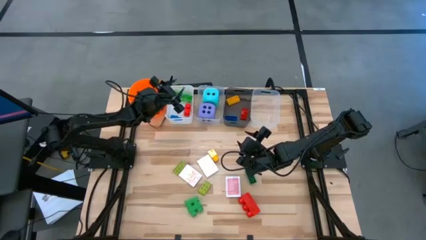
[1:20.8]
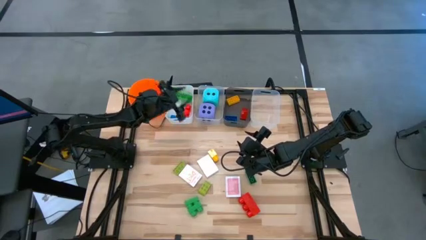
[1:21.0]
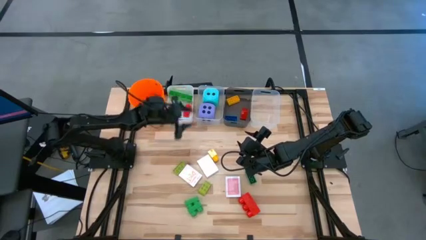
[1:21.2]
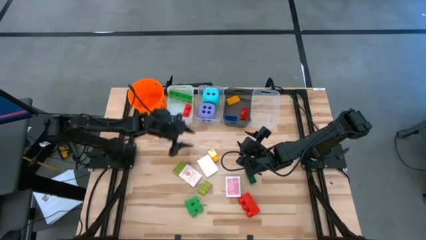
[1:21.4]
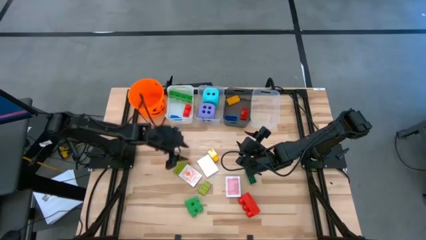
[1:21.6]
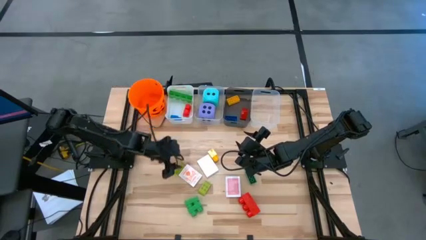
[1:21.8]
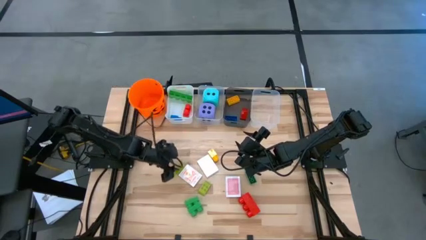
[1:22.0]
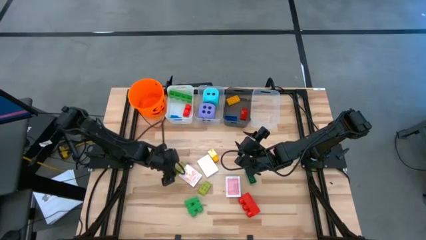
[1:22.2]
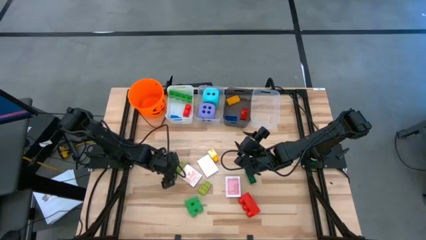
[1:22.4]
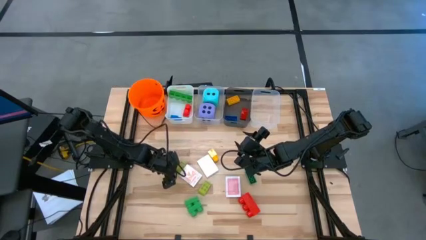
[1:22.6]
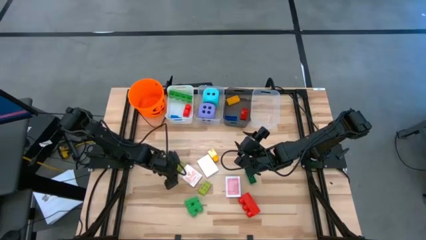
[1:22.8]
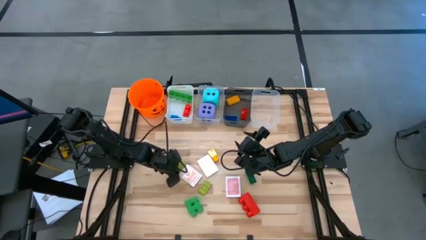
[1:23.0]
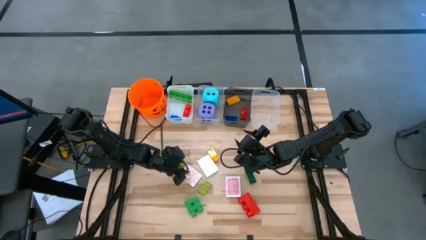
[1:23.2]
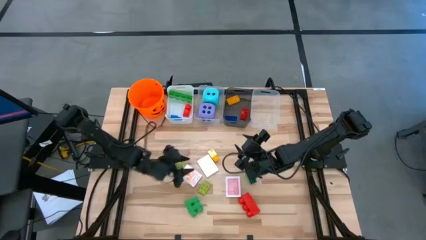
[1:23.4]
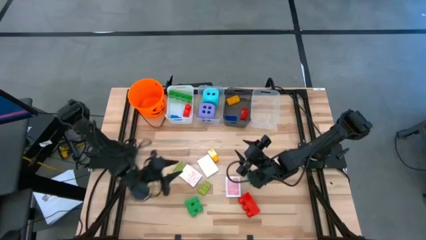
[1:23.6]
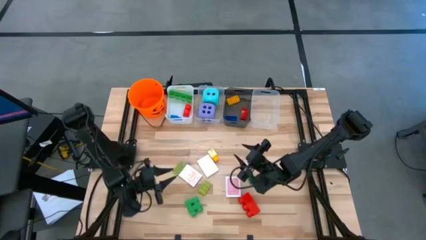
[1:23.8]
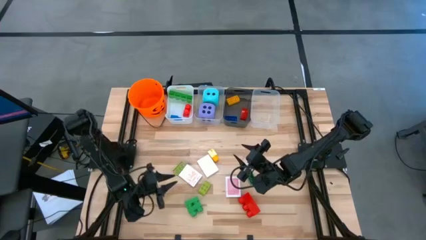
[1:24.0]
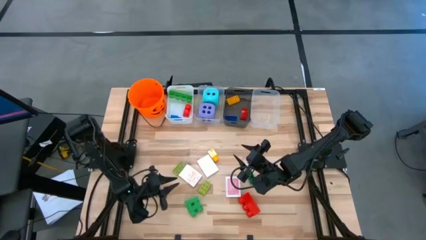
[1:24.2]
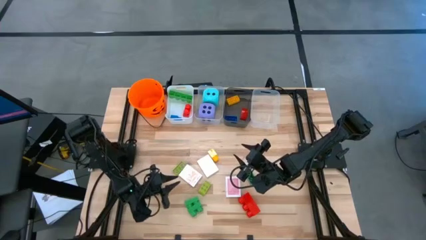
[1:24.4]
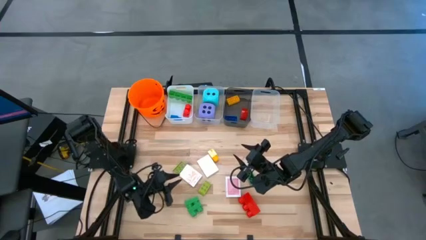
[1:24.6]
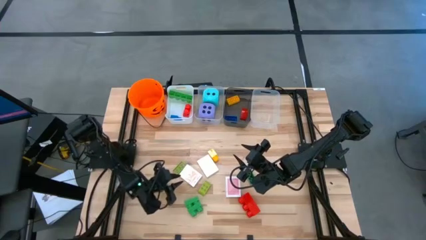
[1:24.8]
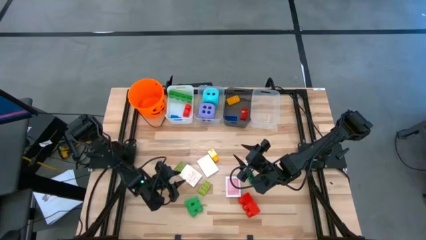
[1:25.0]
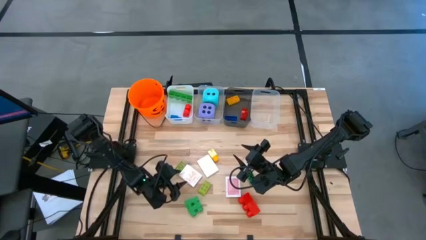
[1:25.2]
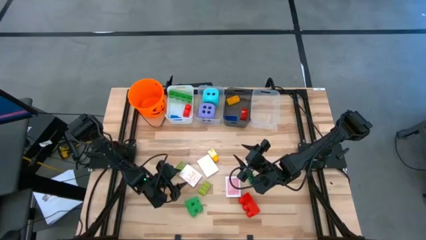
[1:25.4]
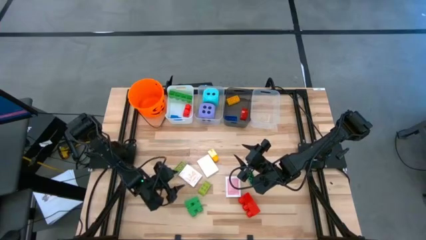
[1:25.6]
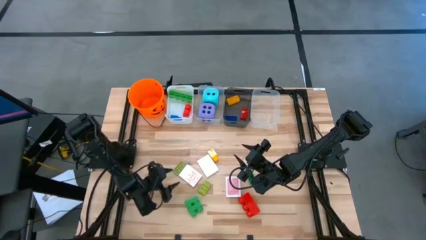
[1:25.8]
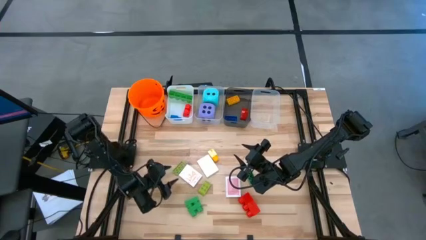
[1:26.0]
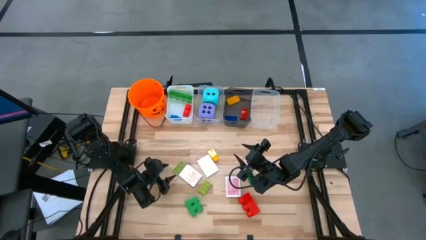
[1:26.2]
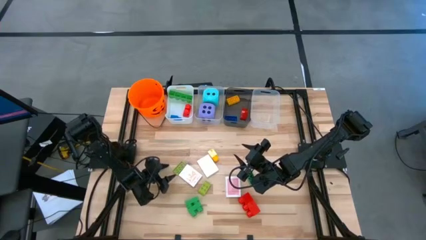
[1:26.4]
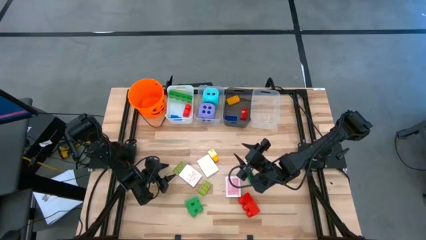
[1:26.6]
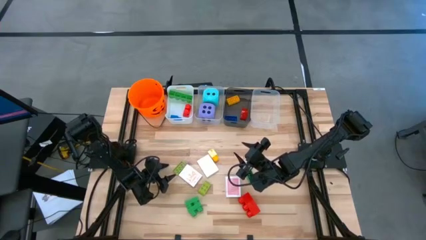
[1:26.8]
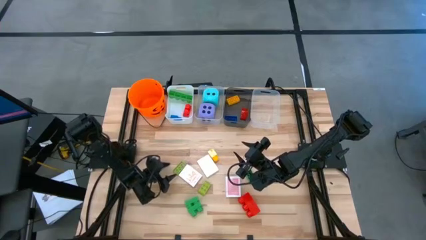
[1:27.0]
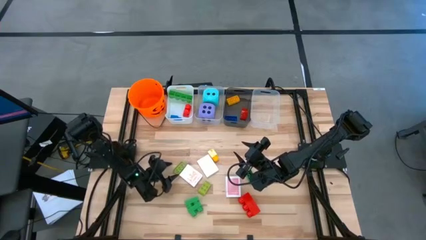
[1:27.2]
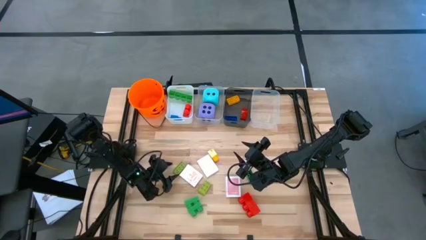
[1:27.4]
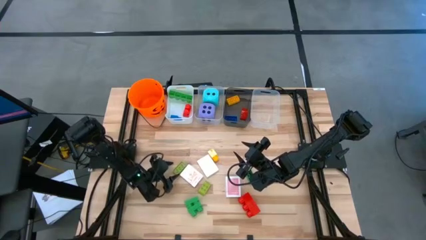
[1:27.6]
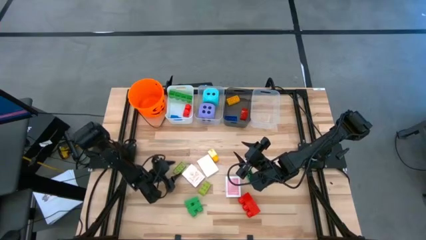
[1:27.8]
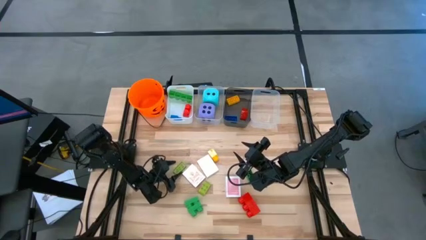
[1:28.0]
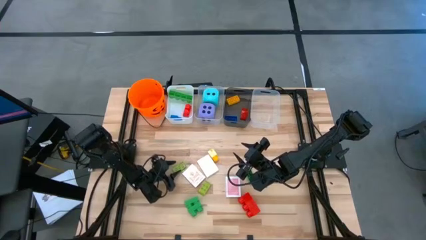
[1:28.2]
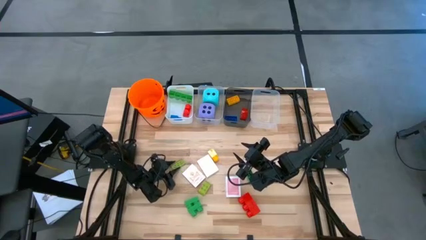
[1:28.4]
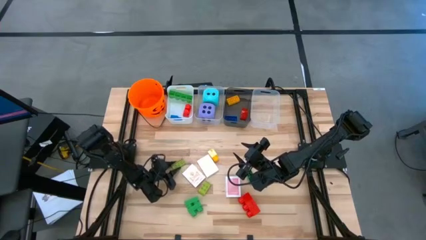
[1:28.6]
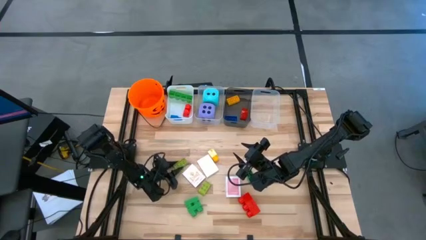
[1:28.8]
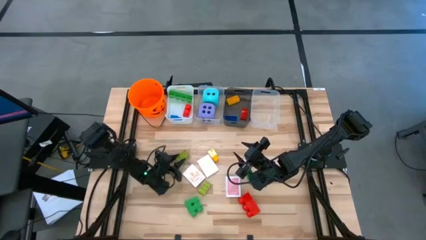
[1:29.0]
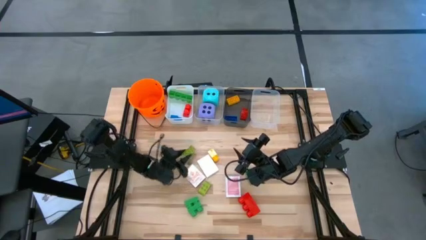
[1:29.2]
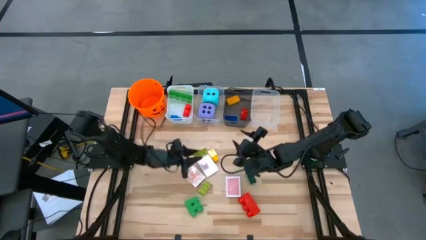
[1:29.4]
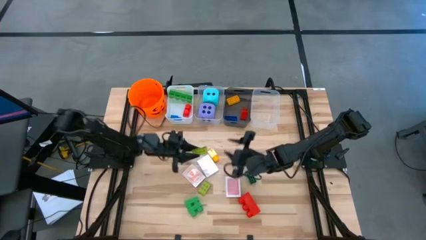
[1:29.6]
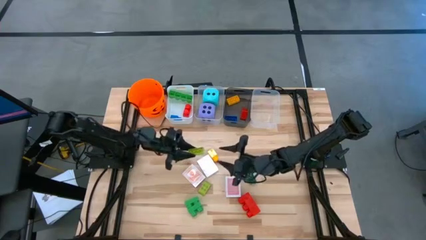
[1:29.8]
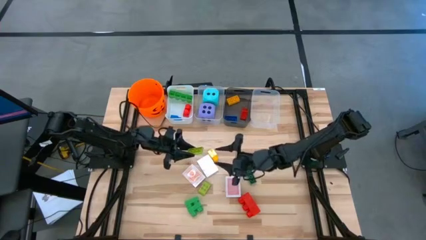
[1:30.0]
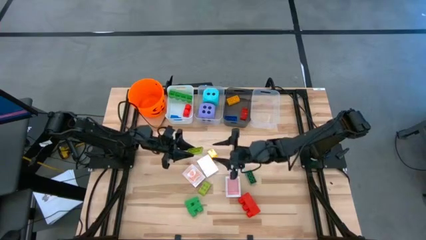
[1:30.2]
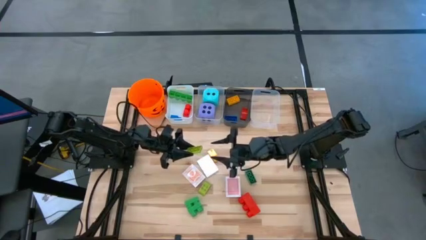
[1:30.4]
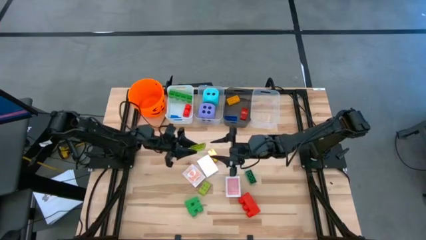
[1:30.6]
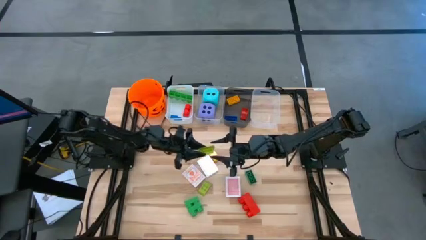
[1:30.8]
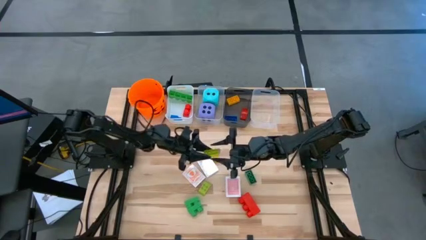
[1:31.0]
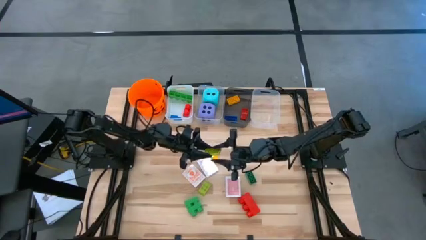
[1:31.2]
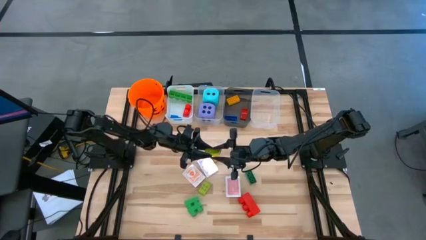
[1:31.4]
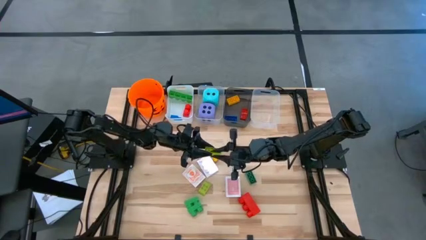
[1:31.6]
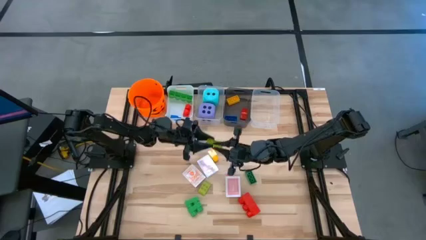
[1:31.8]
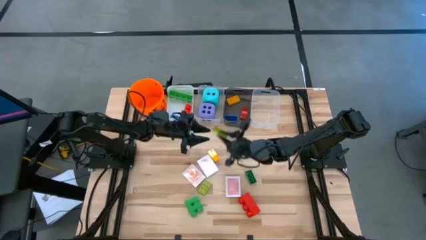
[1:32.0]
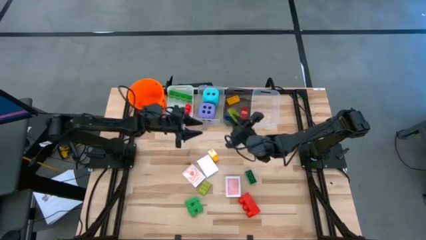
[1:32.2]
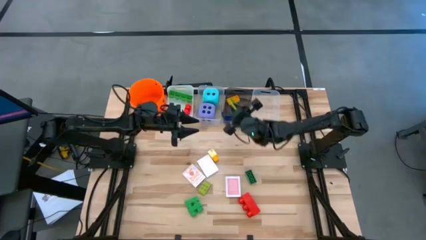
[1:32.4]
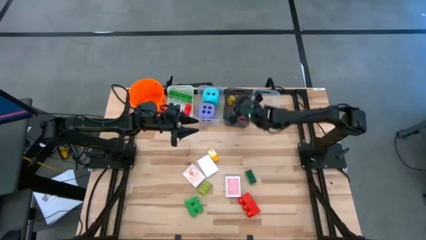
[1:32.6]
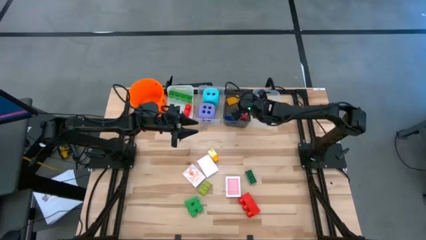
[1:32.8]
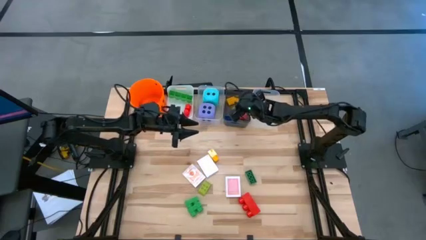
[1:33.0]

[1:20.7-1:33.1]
Task: Pick & Place Toys
Put the left light green game piece into the black bin

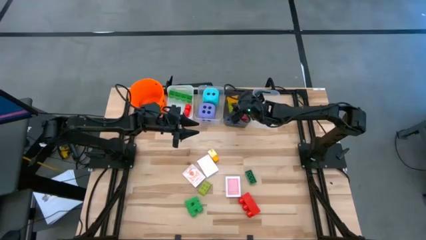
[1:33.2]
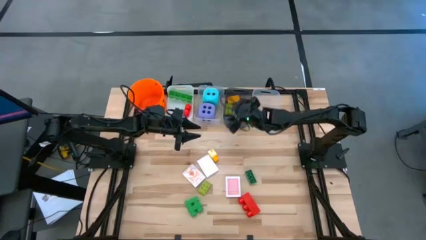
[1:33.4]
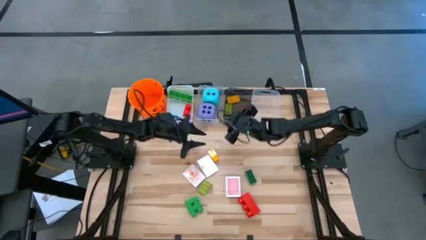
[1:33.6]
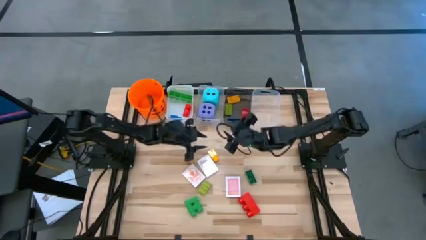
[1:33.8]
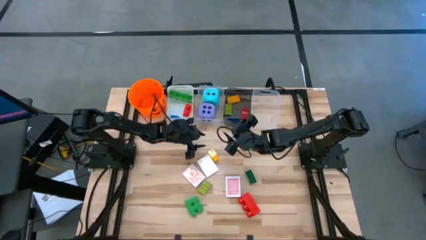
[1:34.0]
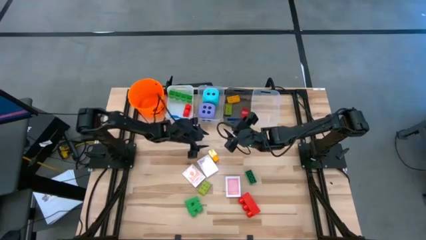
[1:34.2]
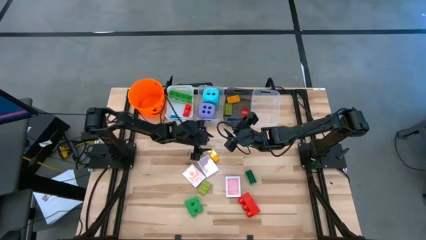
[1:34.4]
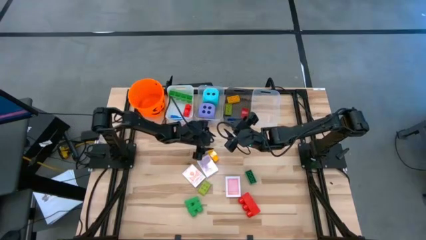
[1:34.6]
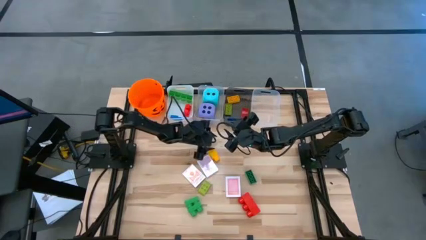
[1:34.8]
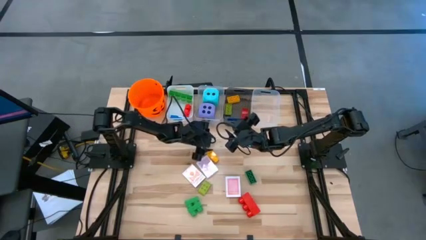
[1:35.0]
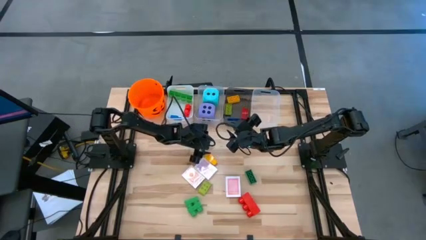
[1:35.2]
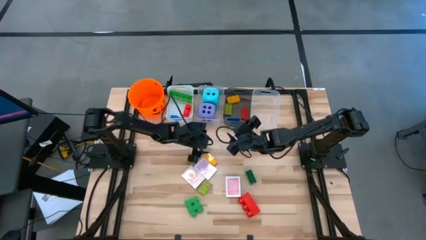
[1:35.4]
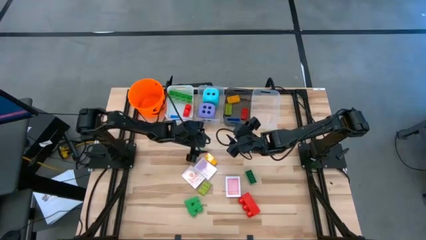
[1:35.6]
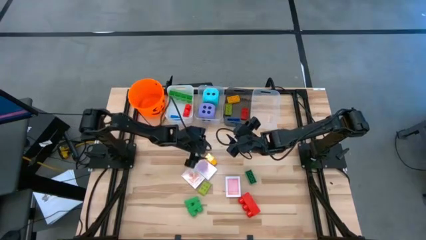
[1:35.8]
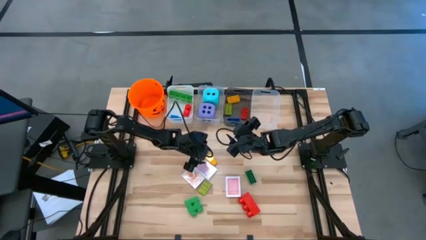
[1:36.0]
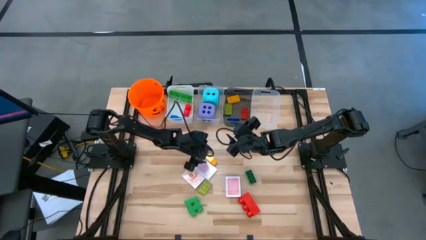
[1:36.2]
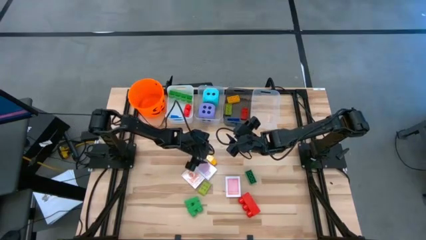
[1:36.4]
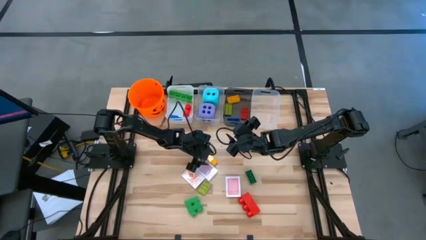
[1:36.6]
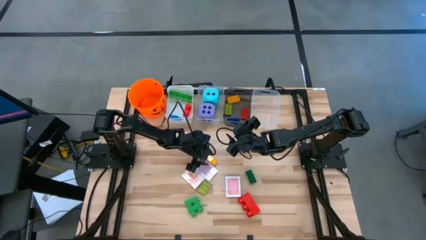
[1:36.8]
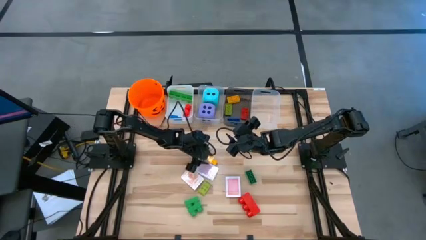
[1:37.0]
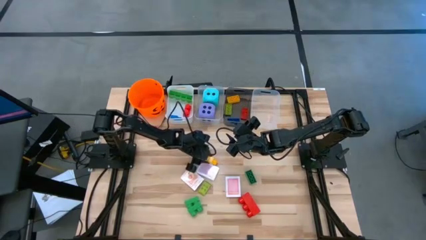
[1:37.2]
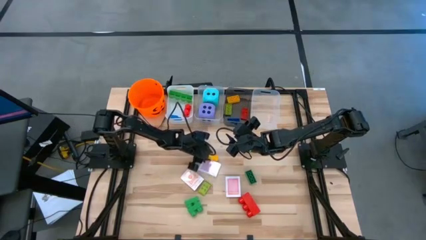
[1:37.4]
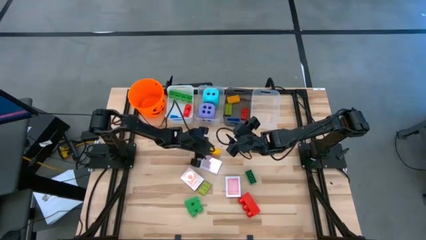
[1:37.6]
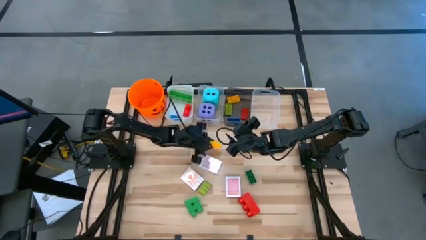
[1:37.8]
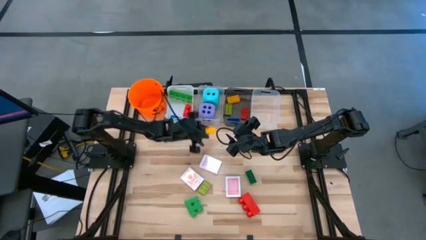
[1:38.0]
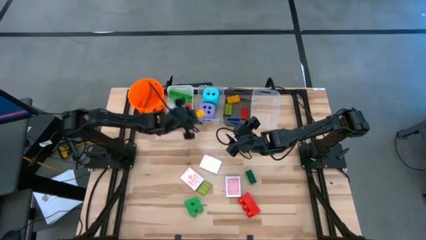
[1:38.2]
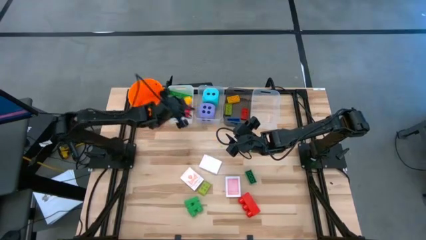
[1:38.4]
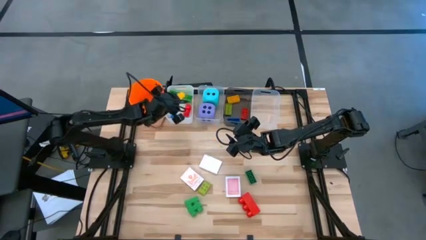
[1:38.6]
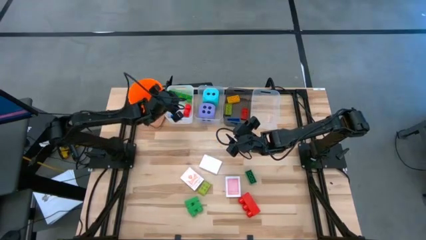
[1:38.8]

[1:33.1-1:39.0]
Put the yellow game piece into the white bin
